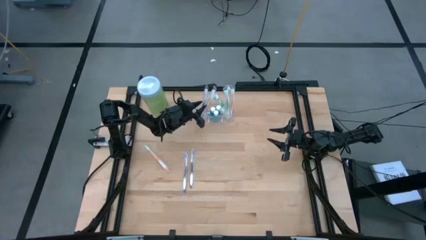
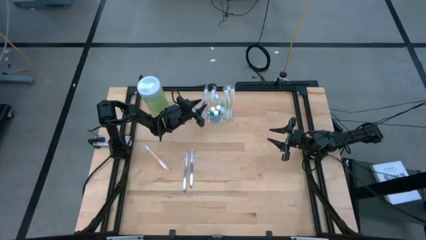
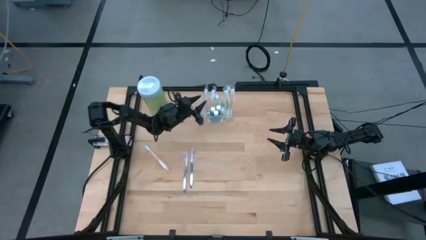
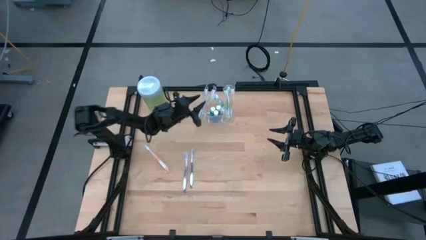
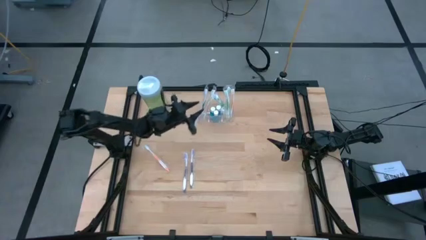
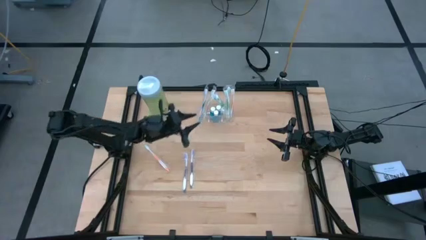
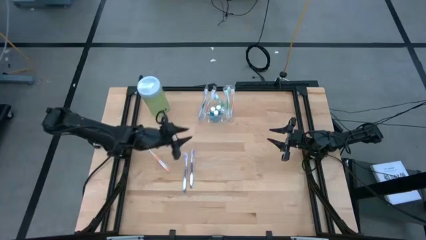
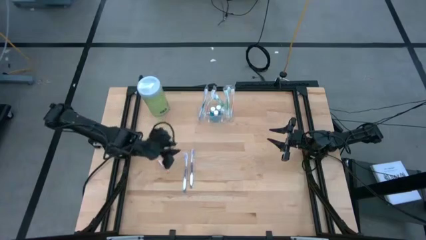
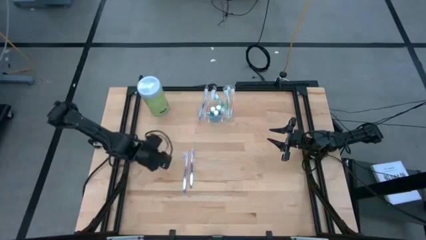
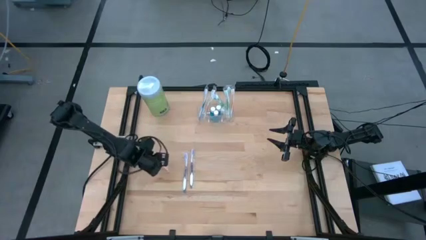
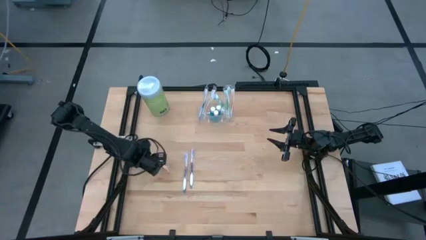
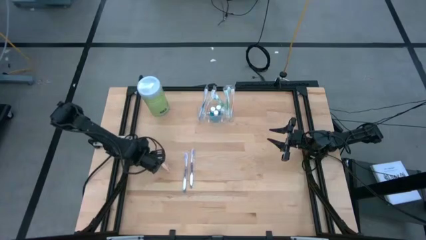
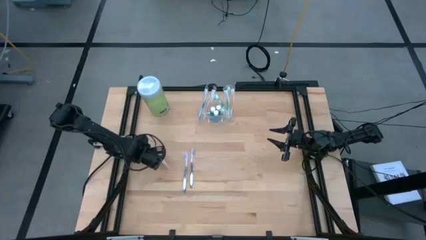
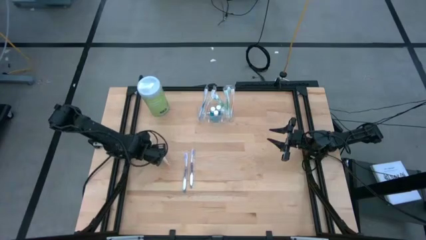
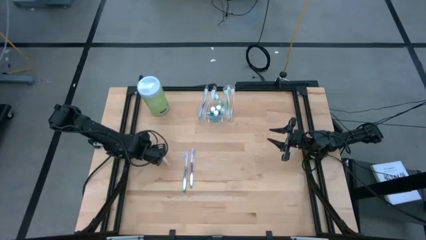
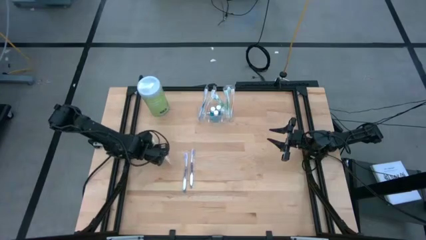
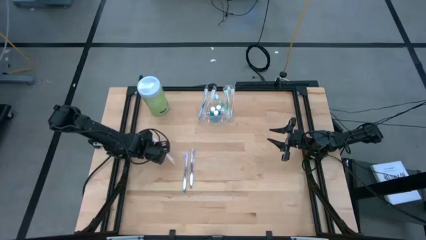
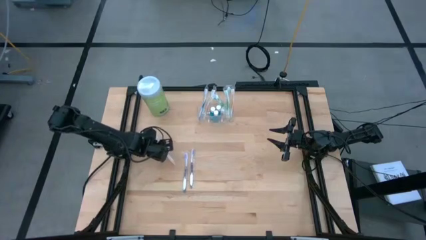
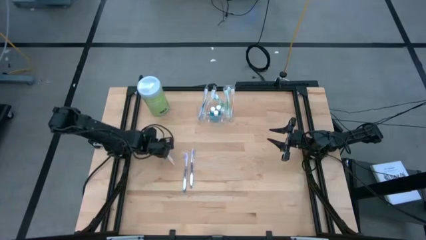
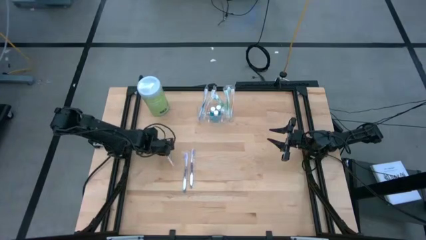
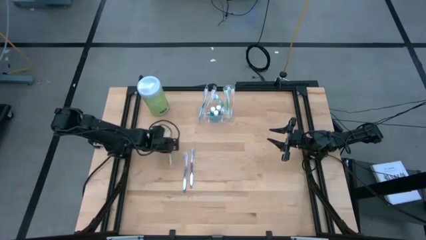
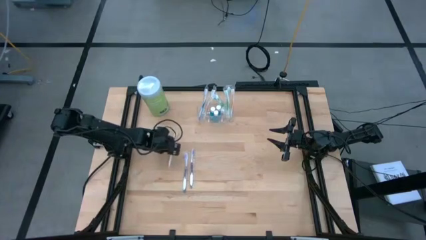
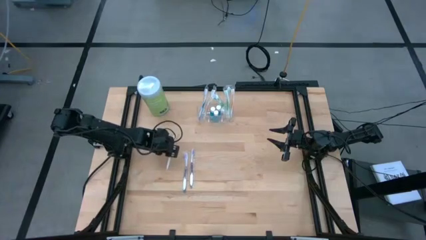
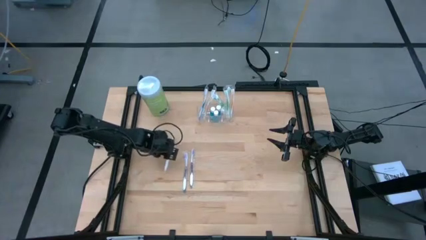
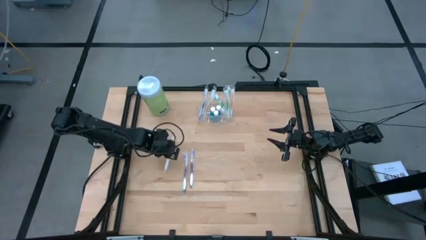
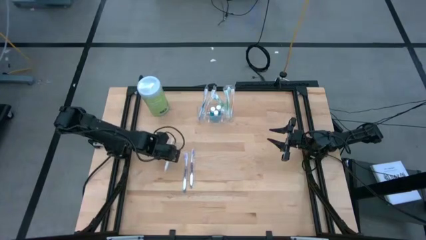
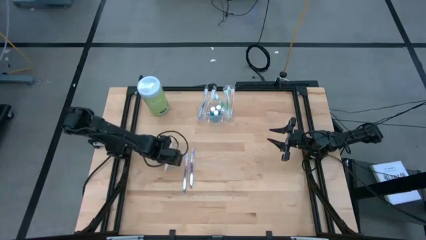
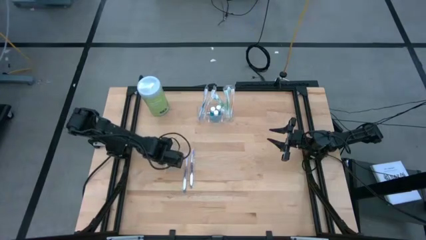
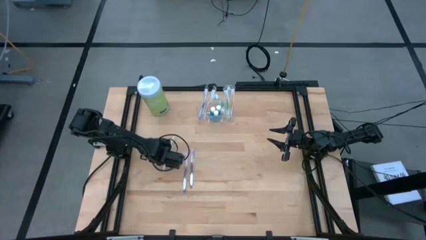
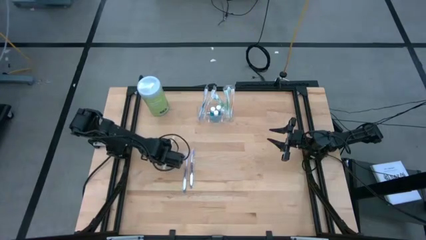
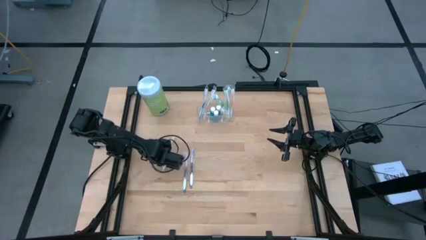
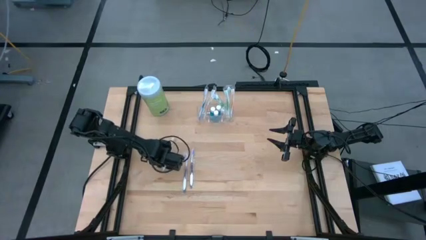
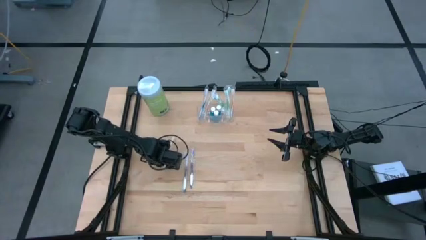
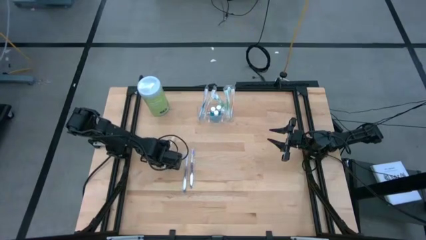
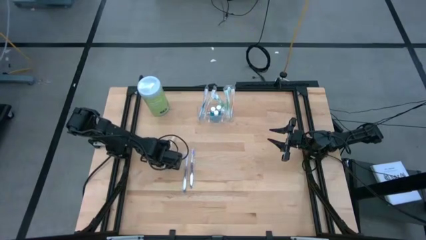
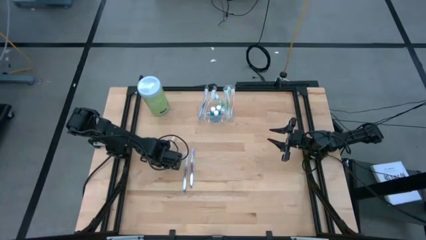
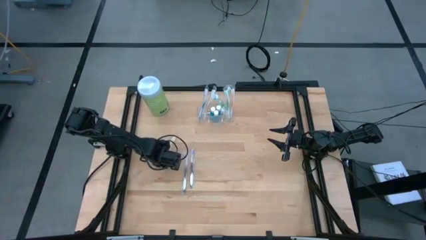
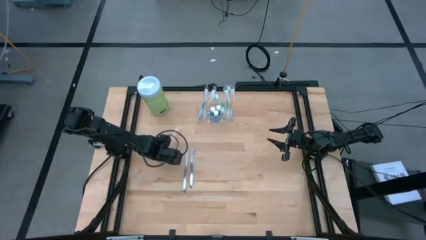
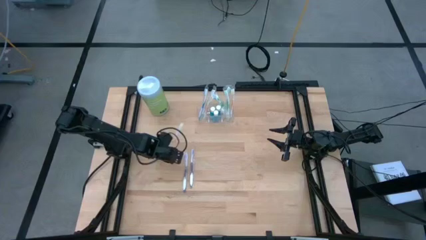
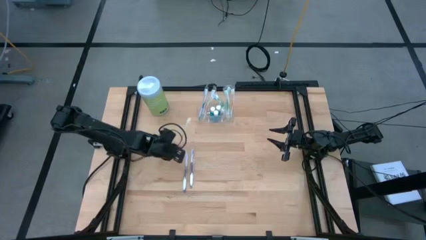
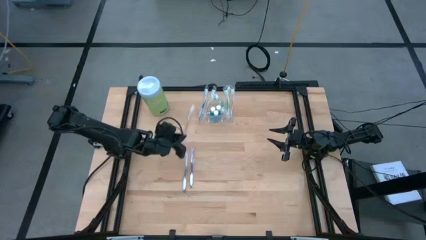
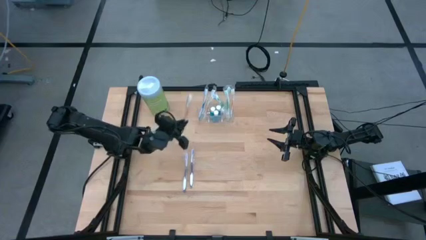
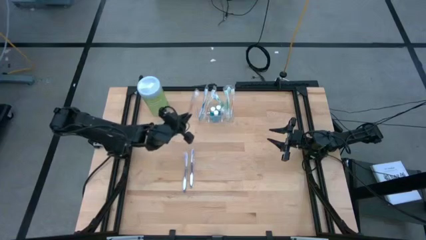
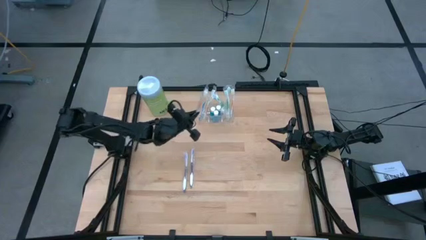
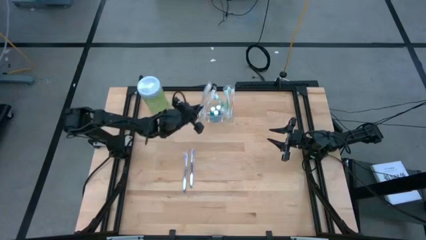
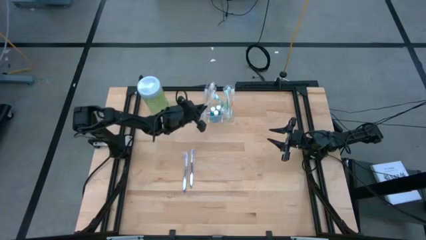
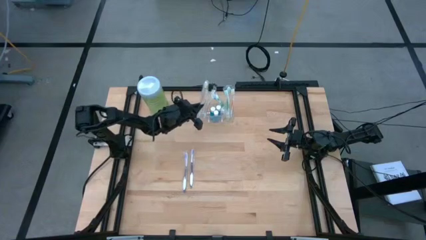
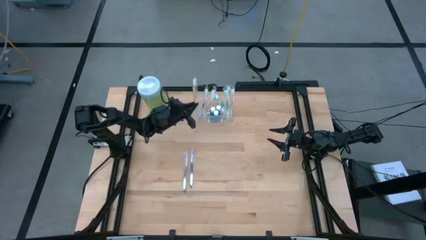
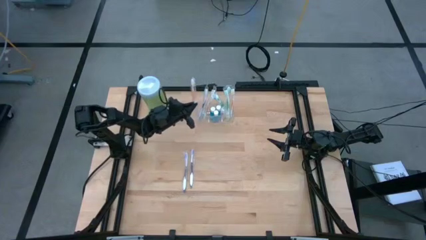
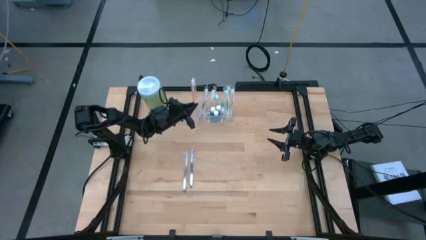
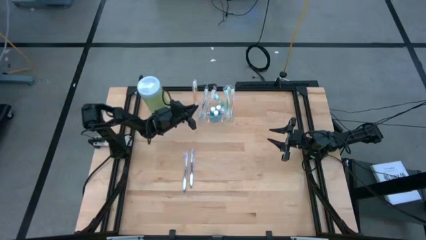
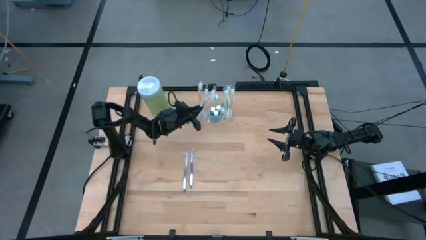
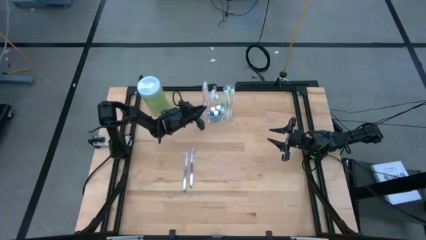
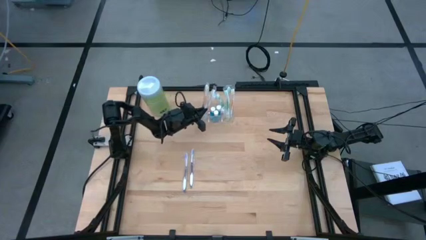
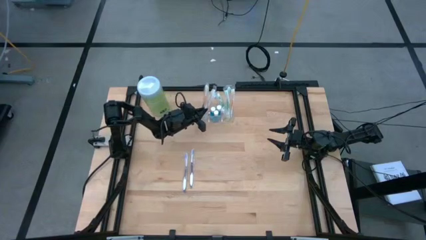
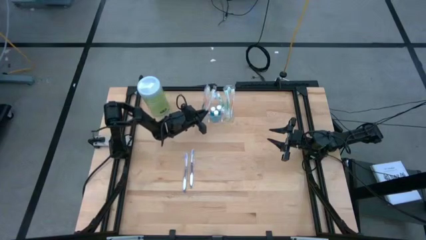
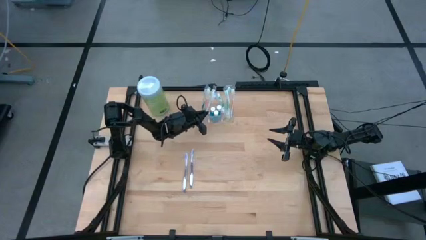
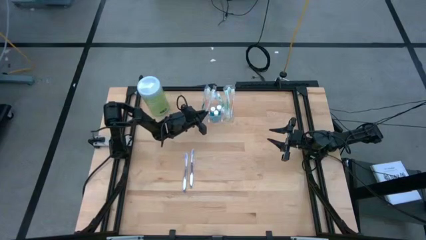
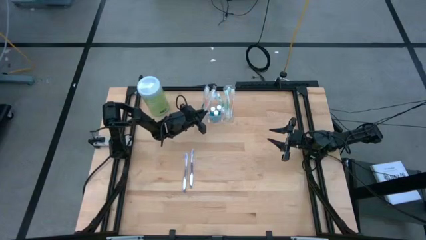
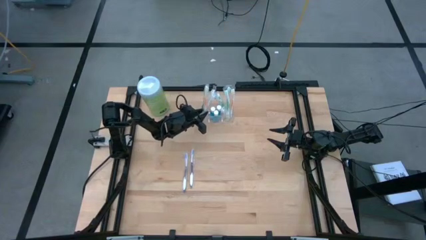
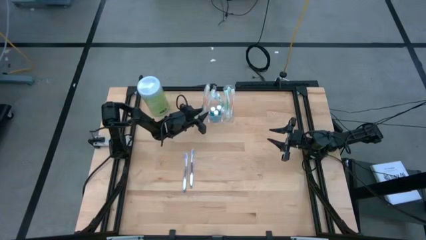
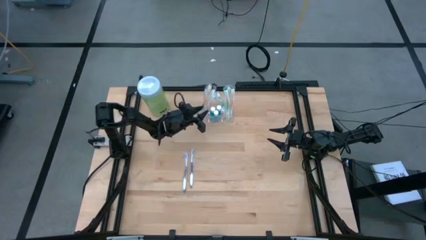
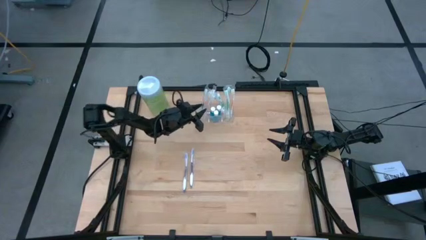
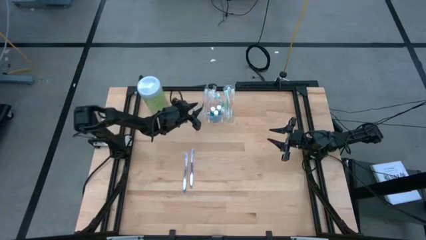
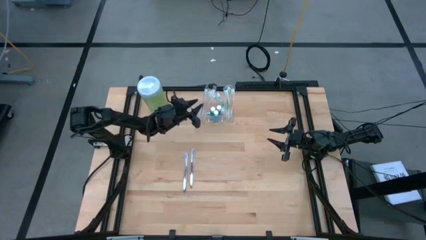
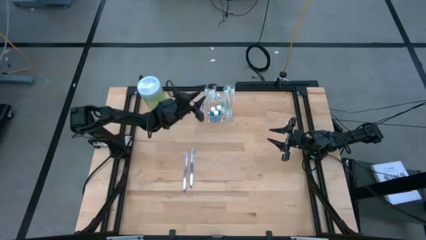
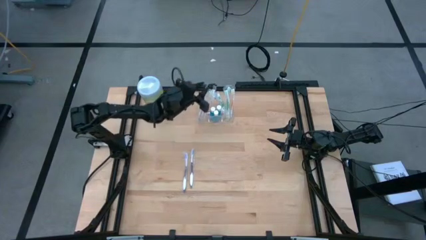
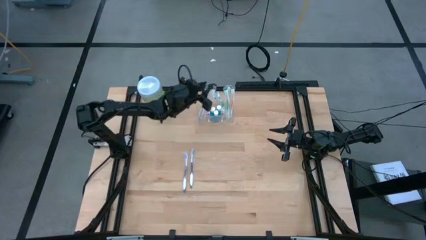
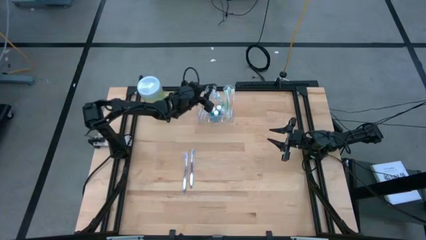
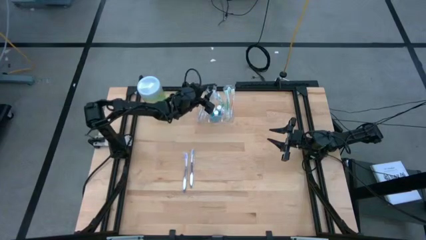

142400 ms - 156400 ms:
Task: Pick & Place toothbrushing station
Put the orange toothbrush into the transparent organizer

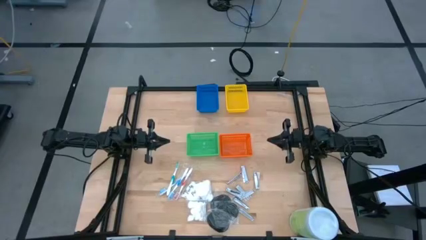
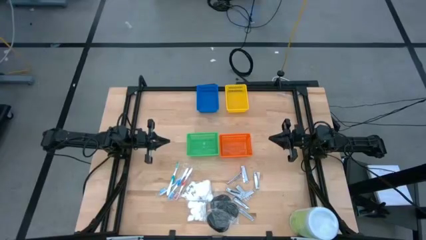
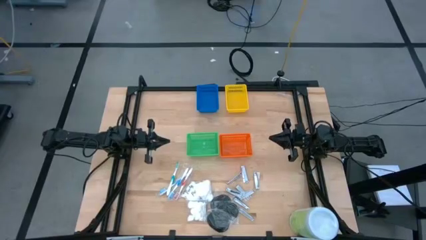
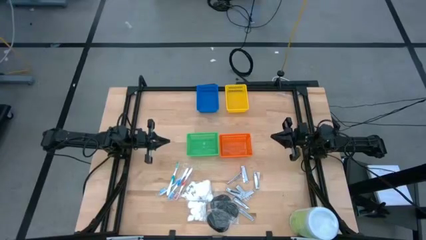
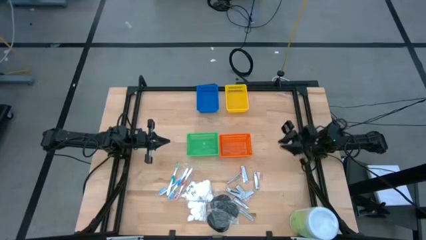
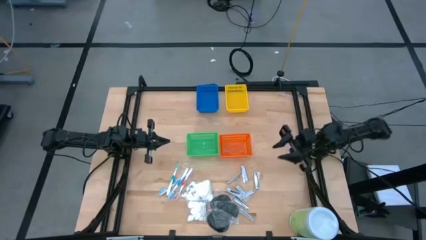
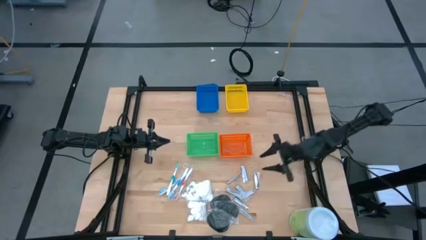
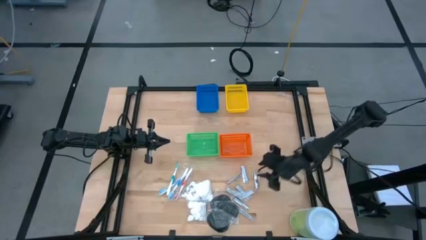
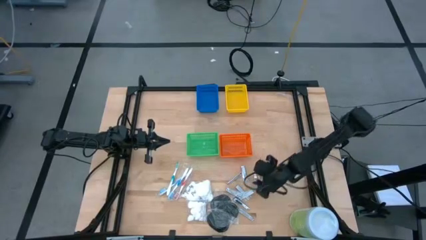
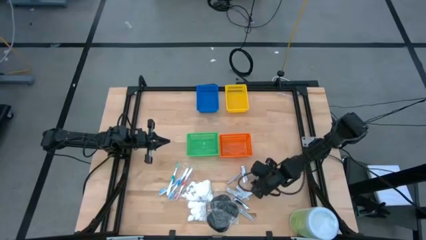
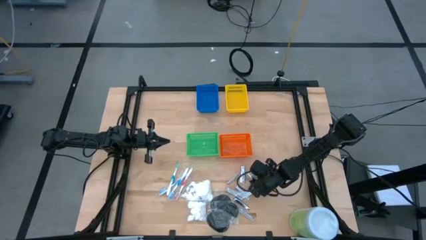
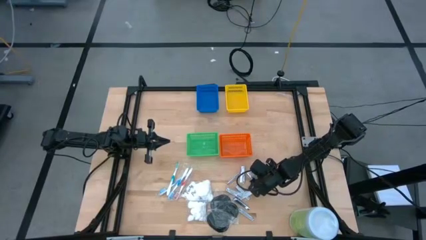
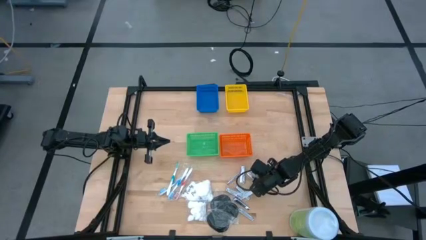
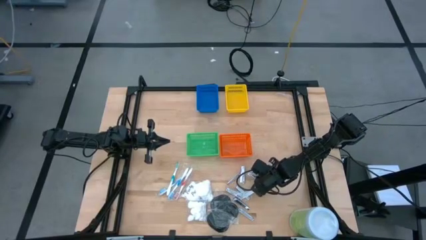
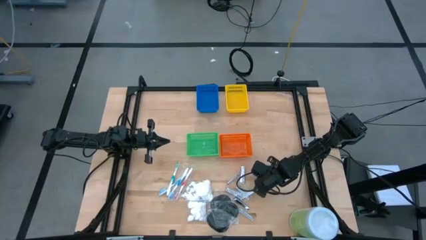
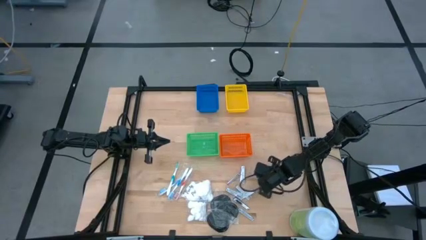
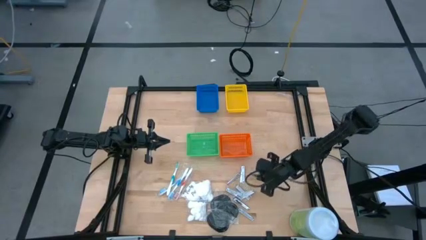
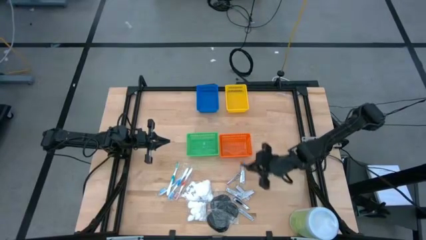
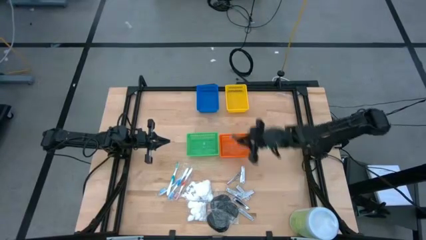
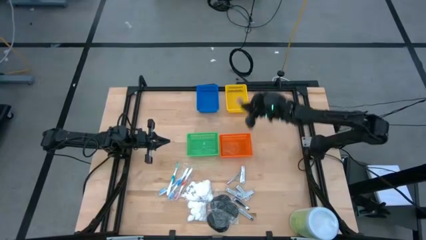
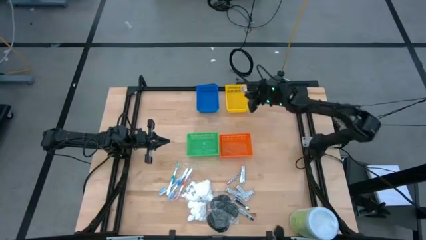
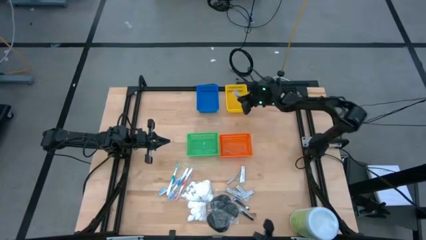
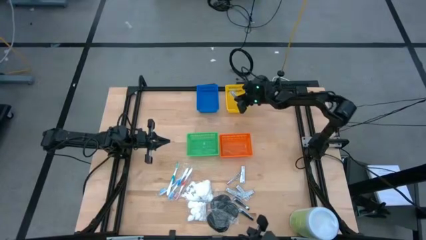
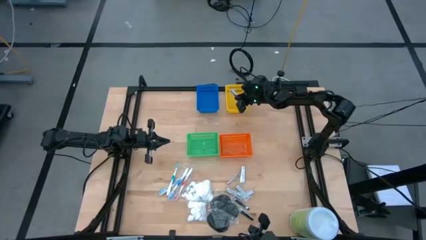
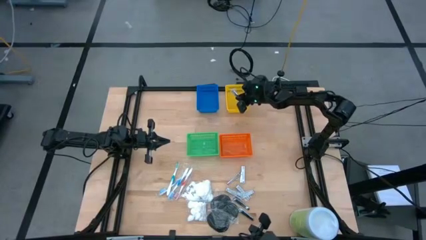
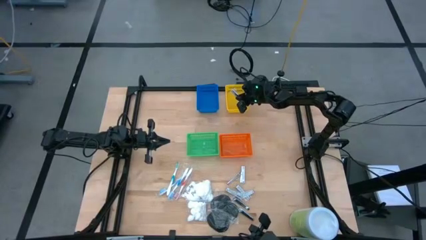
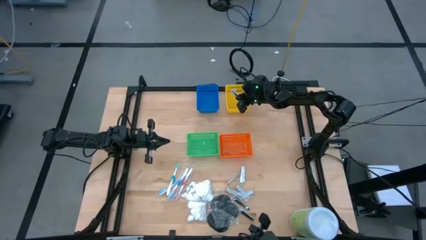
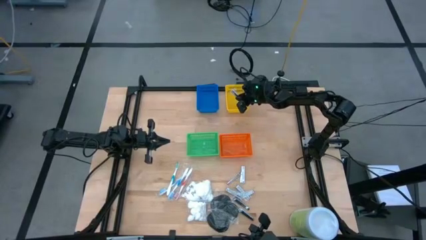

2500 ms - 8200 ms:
Task: Pick & Place Travel size toiletries
Put the nail cutter into the yellow bin
